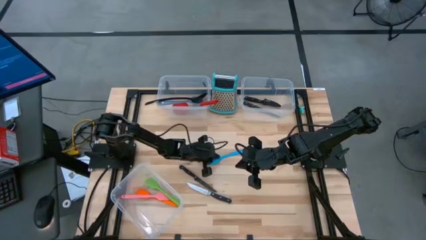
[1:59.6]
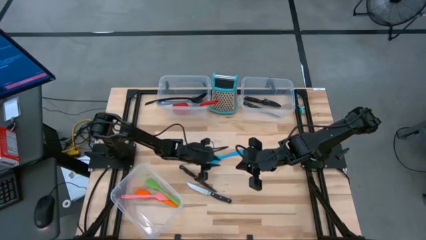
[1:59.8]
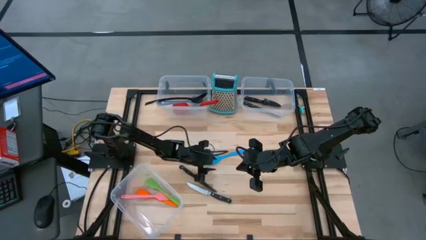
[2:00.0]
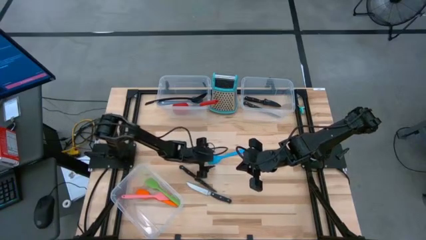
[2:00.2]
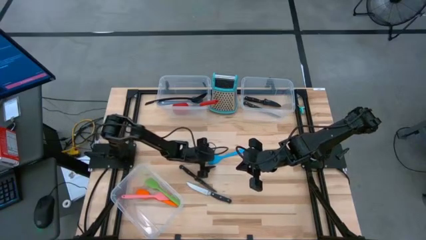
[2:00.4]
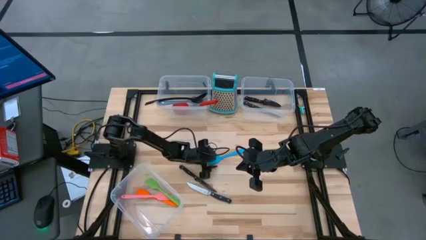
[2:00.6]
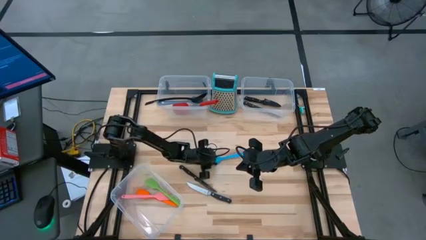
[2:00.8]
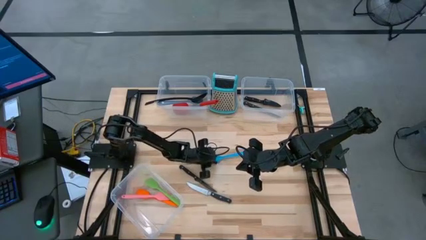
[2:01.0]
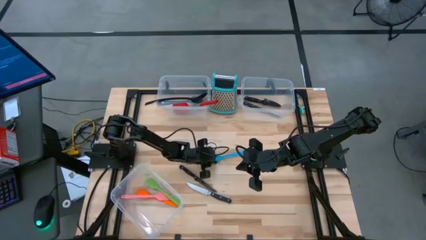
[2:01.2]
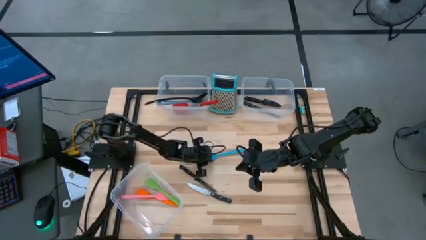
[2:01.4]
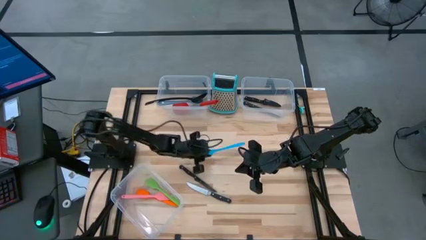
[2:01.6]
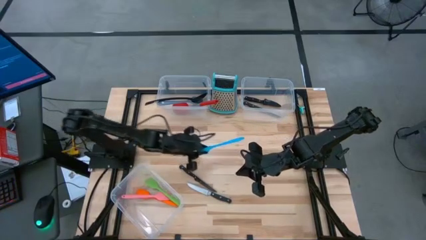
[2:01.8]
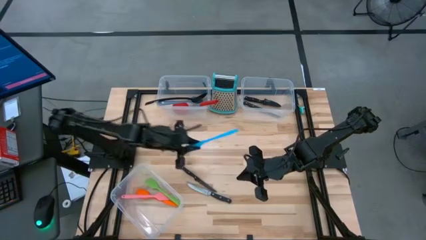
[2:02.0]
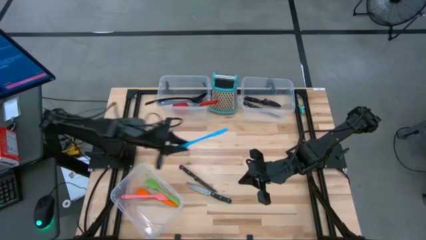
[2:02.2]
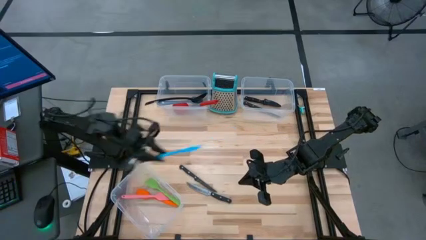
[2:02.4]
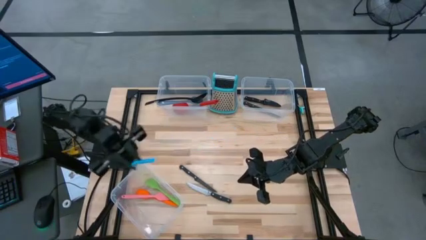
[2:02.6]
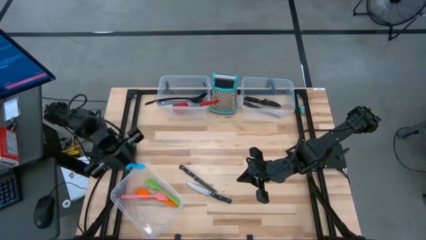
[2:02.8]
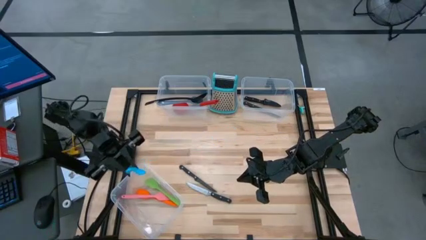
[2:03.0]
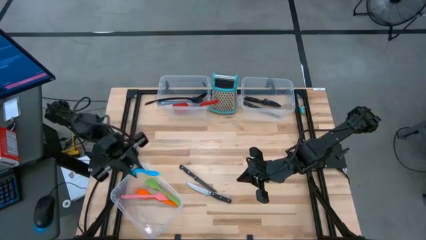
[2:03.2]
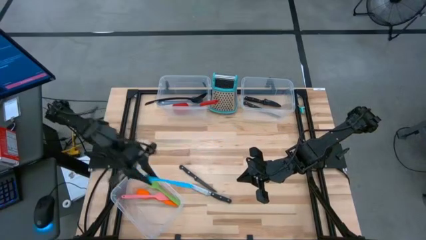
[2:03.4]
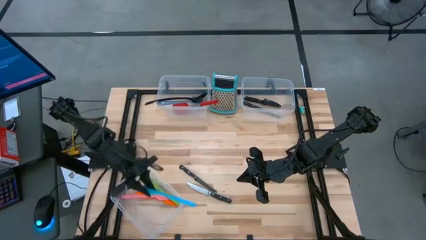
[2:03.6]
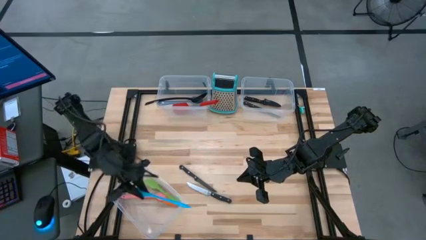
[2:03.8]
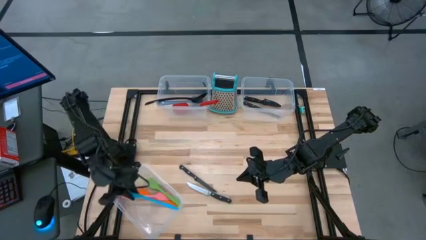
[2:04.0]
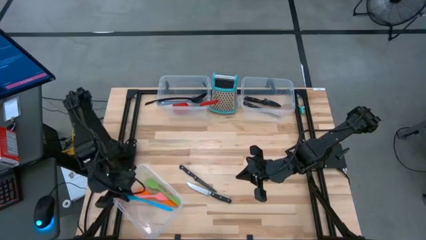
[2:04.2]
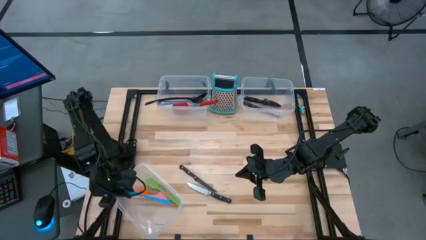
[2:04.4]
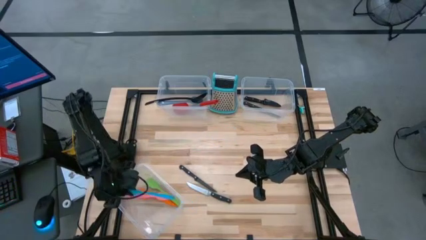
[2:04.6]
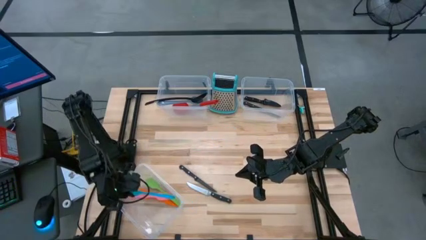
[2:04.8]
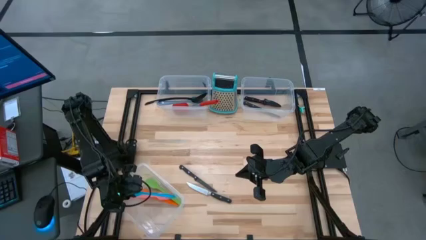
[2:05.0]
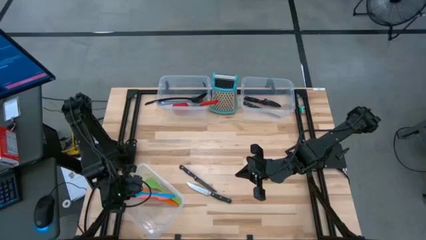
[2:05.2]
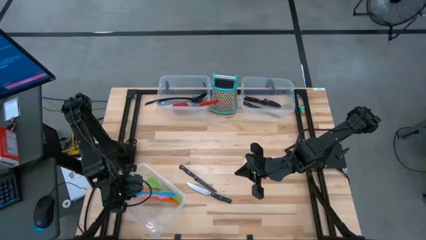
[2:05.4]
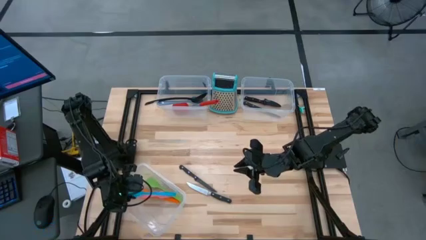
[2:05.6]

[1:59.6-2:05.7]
Task: Pick & Place Kitchen Items
Put the blue spatula into the bottom transparent bin

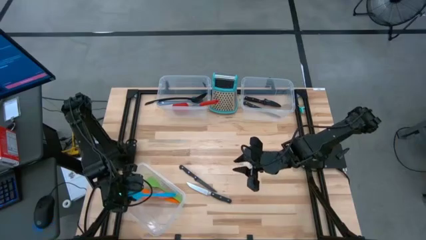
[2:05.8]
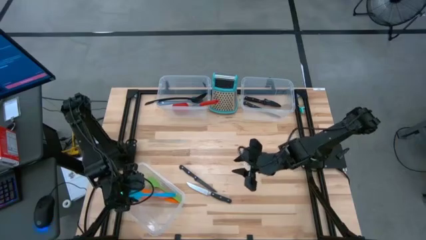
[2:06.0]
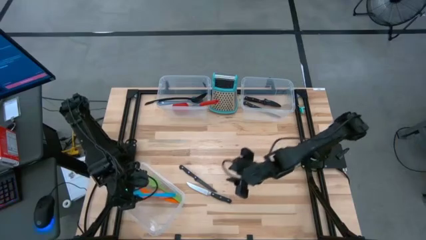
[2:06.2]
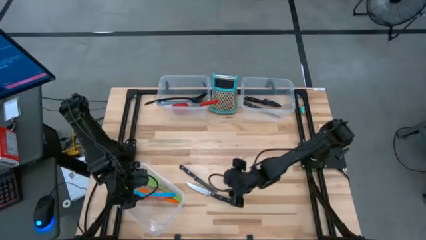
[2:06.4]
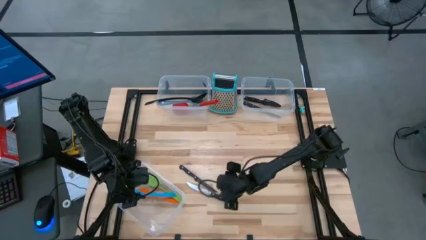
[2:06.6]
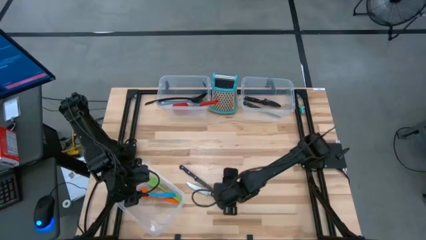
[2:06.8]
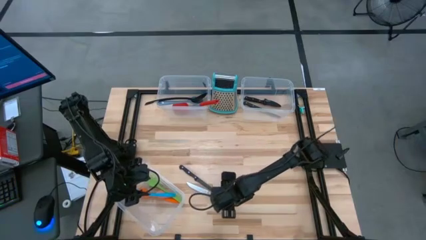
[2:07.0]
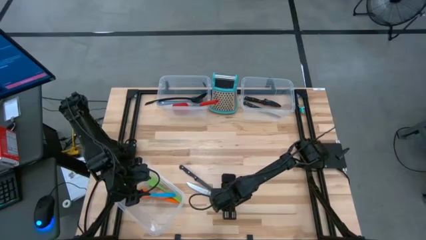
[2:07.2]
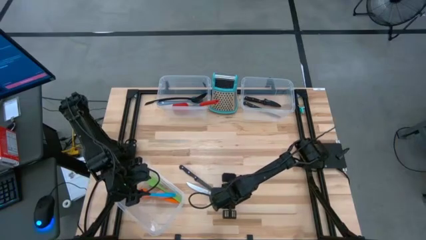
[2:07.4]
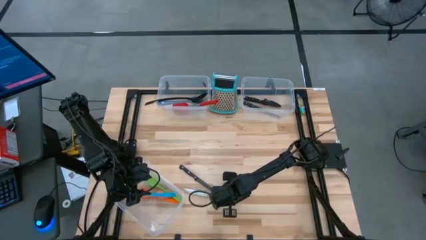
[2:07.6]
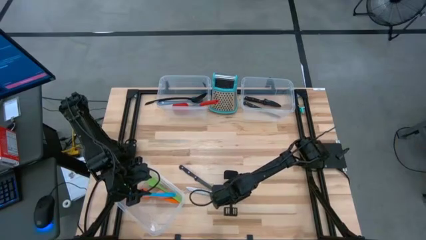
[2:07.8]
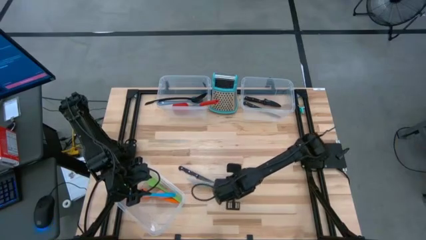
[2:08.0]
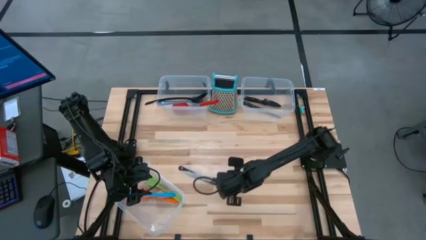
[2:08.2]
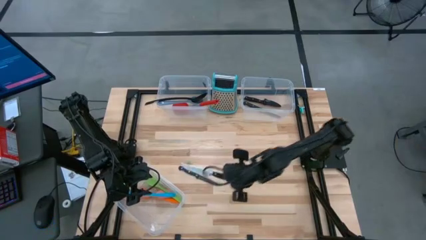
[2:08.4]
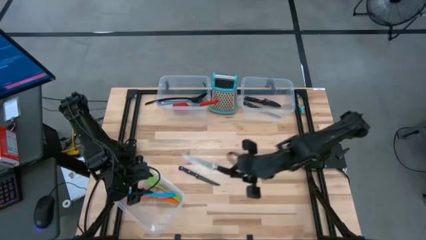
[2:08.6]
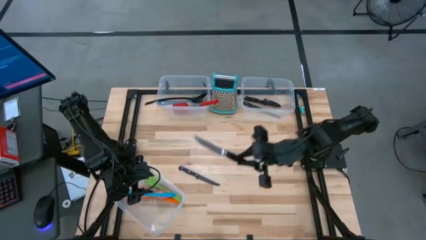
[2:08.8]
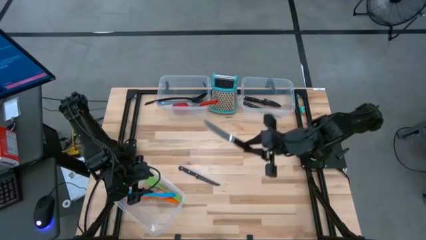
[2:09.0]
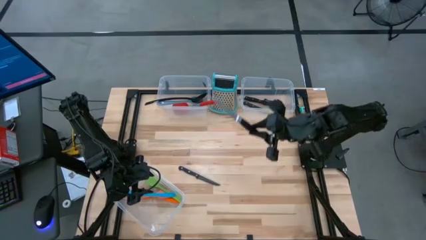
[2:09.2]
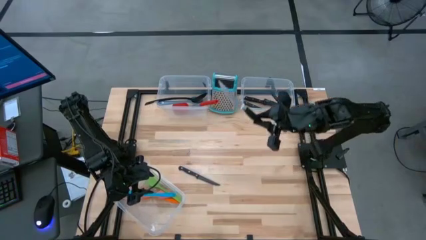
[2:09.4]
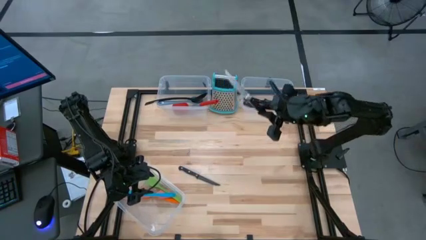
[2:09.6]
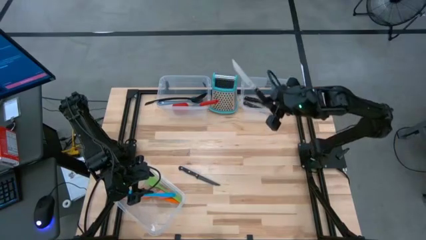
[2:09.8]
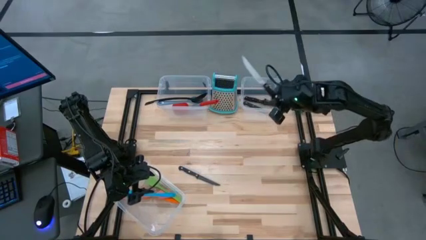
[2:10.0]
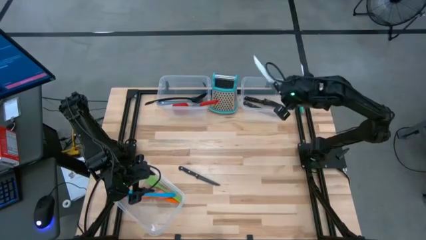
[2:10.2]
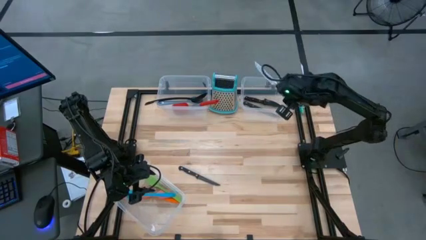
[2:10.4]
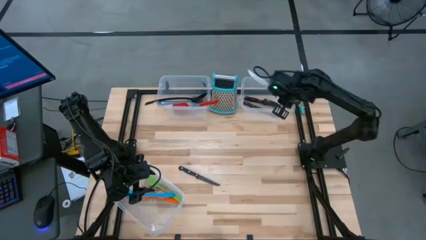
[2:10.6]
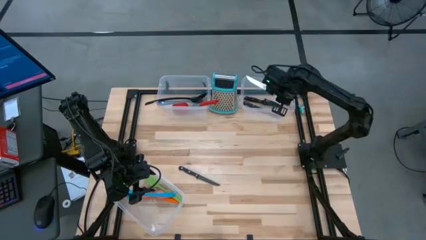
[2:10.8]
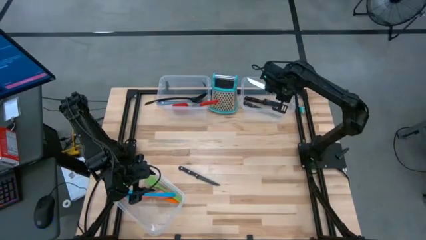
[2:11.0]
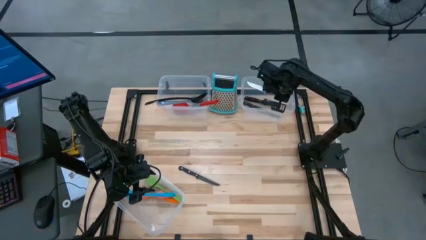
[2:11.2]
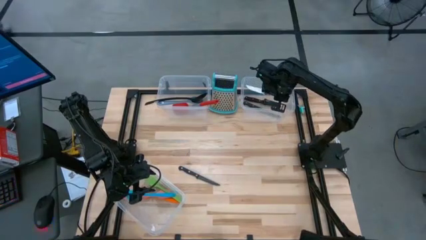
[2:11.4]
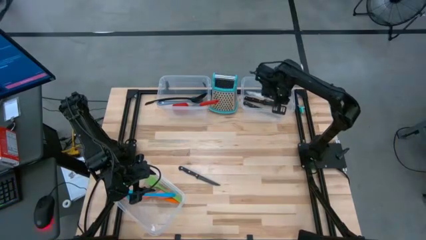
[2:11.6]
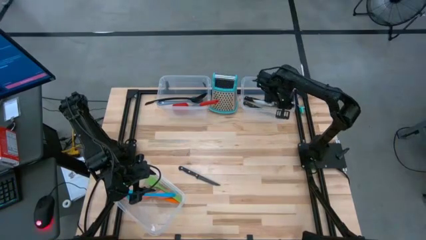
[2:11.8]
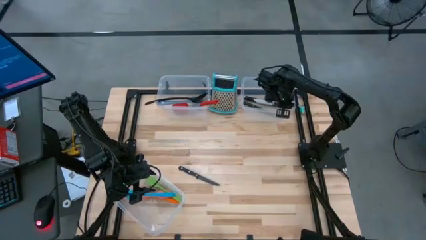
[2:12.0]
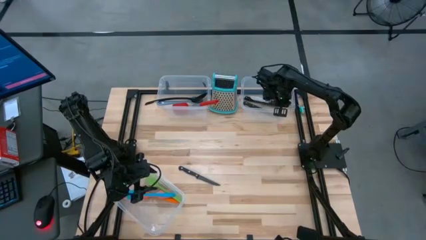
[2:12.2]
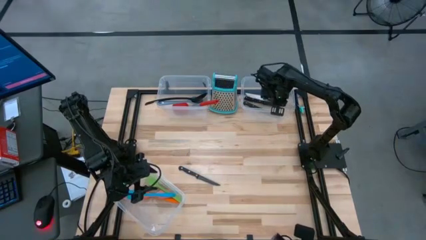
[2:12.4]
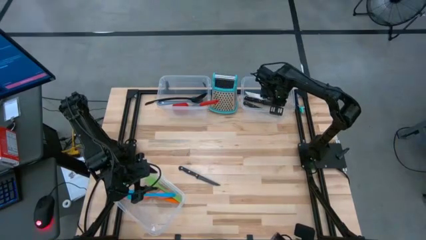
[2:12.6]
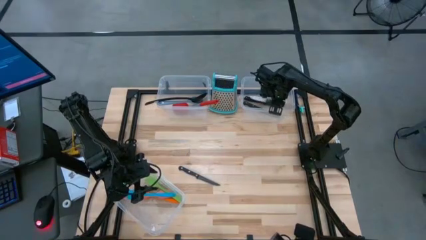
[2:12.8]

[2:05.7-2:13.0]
Put the silver table knife into the top right transparent bin
